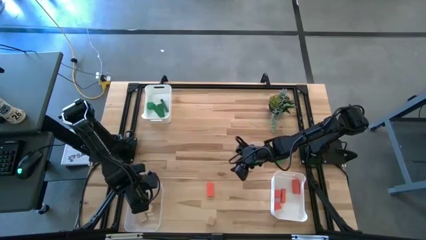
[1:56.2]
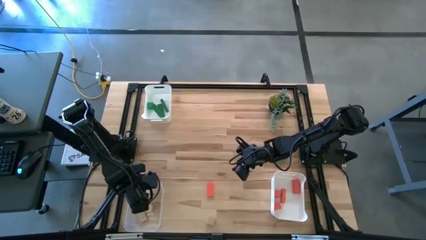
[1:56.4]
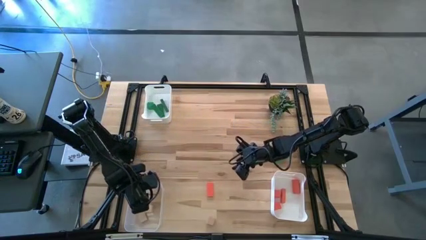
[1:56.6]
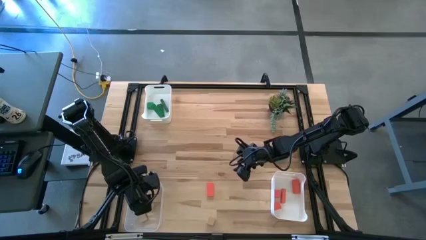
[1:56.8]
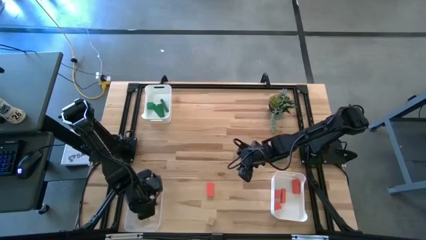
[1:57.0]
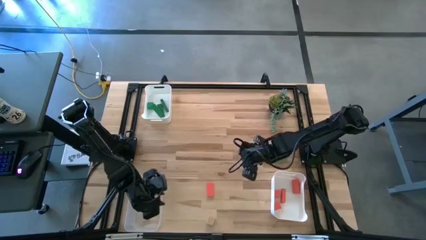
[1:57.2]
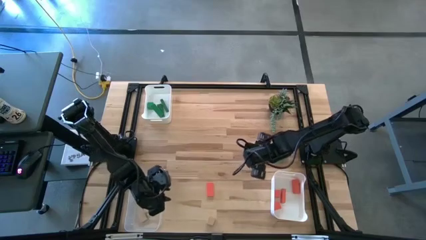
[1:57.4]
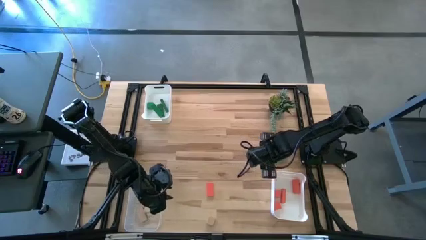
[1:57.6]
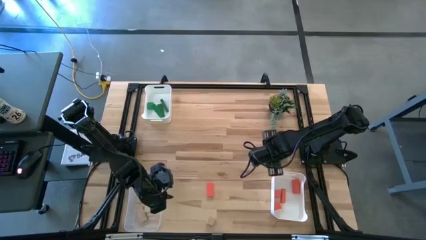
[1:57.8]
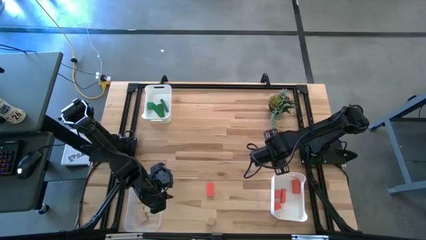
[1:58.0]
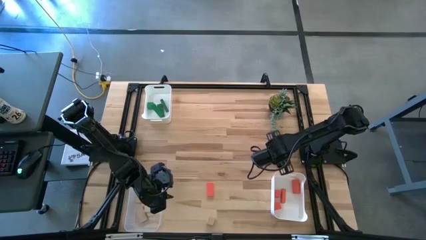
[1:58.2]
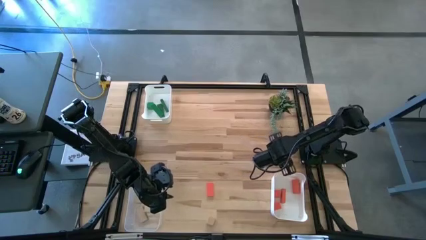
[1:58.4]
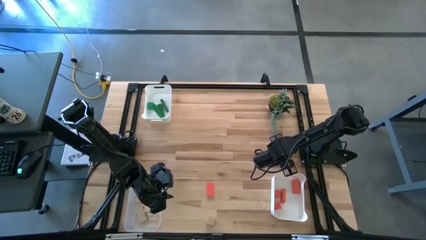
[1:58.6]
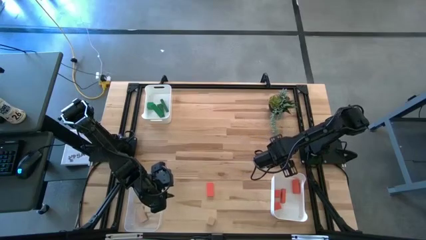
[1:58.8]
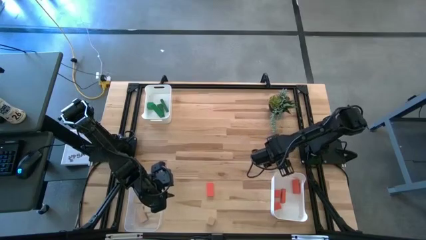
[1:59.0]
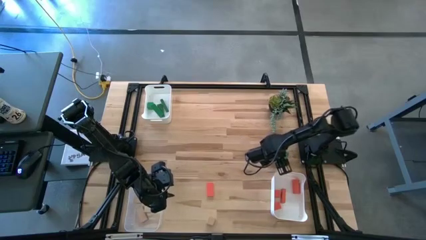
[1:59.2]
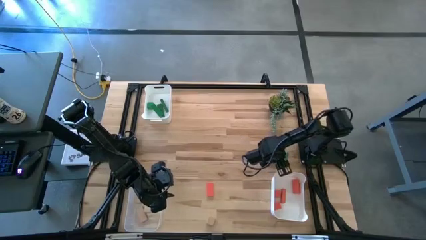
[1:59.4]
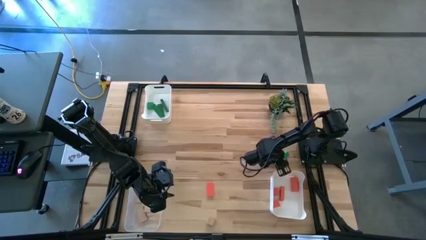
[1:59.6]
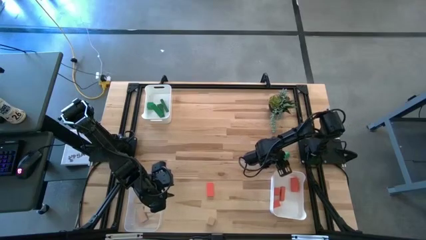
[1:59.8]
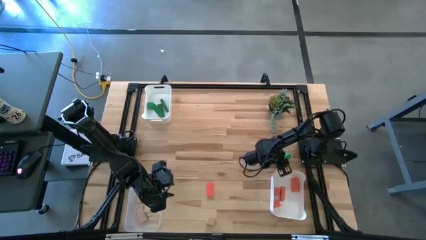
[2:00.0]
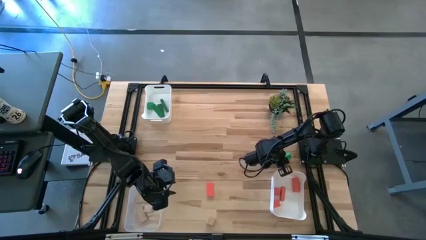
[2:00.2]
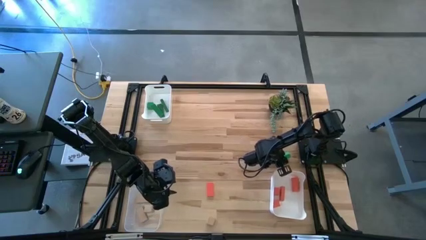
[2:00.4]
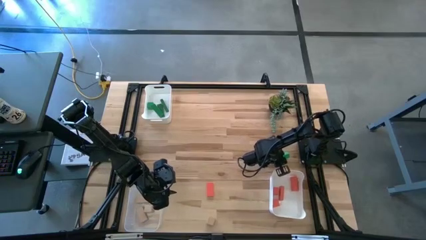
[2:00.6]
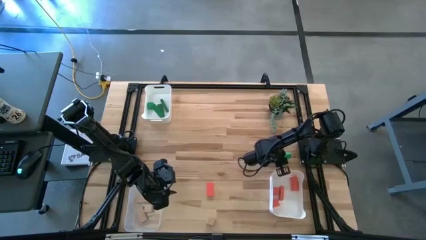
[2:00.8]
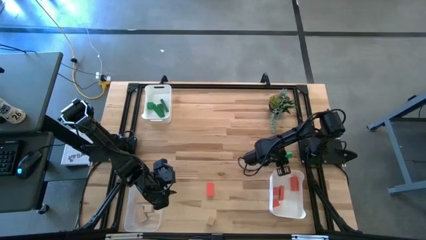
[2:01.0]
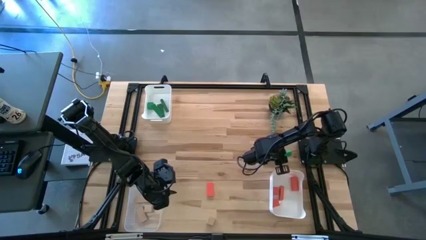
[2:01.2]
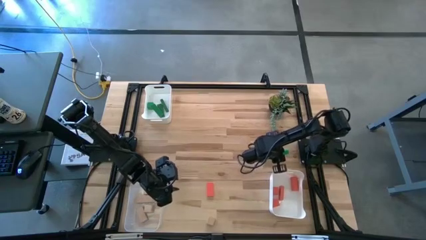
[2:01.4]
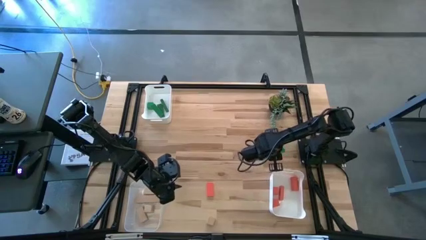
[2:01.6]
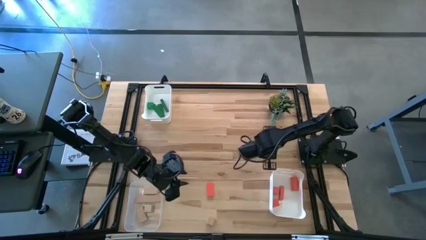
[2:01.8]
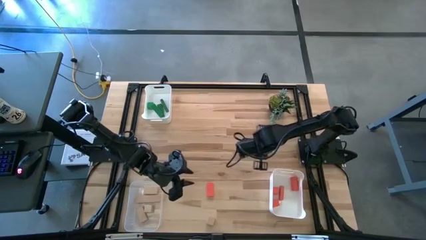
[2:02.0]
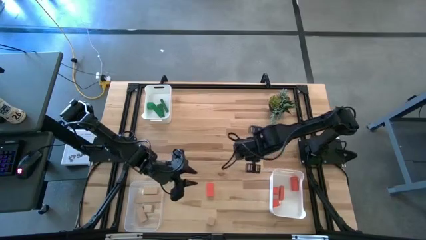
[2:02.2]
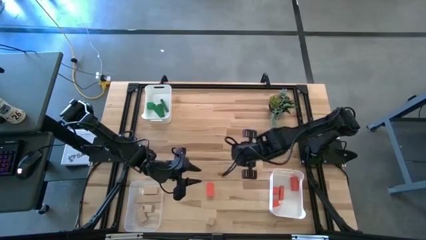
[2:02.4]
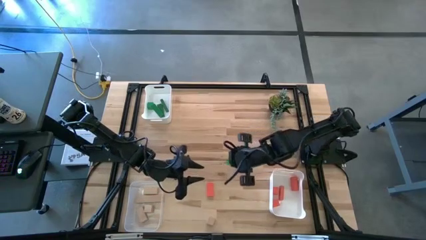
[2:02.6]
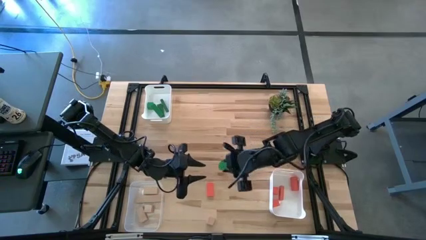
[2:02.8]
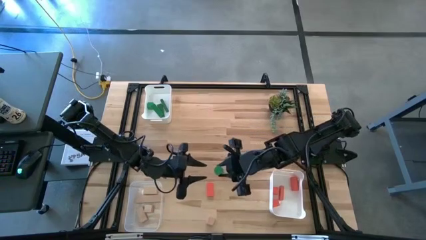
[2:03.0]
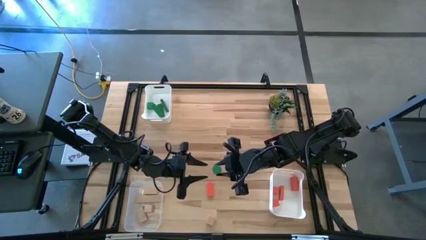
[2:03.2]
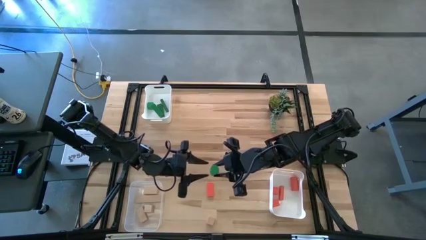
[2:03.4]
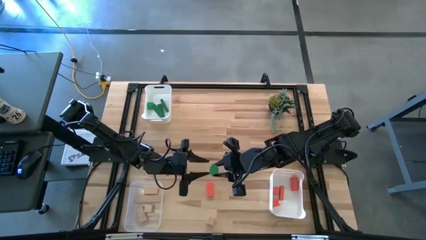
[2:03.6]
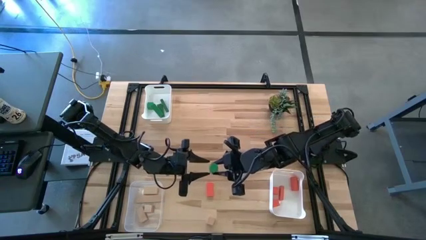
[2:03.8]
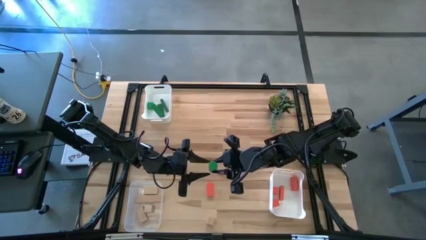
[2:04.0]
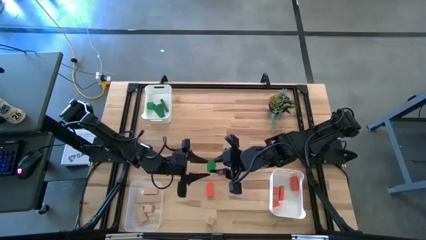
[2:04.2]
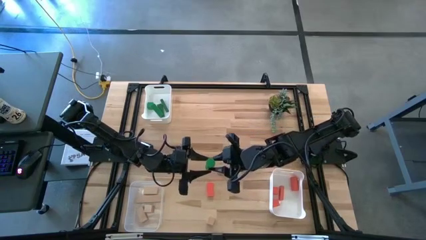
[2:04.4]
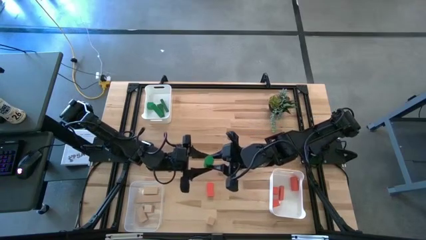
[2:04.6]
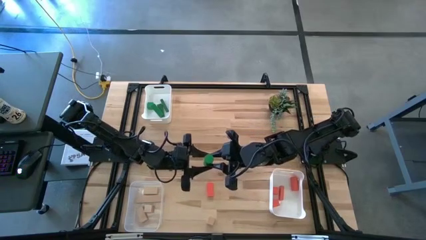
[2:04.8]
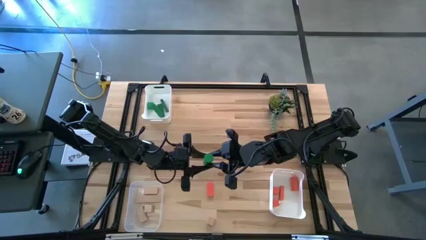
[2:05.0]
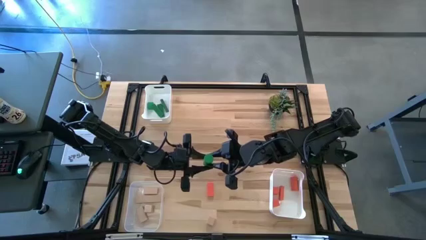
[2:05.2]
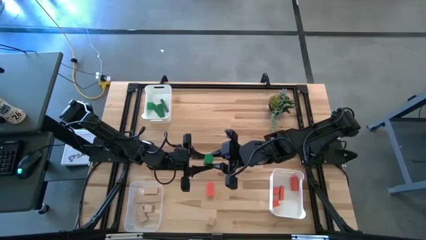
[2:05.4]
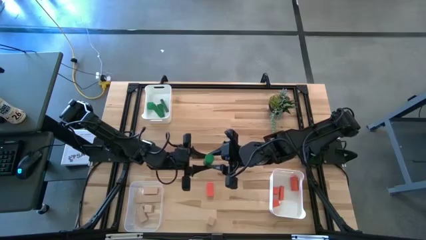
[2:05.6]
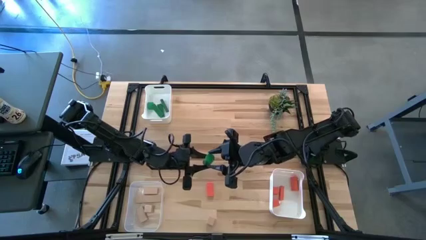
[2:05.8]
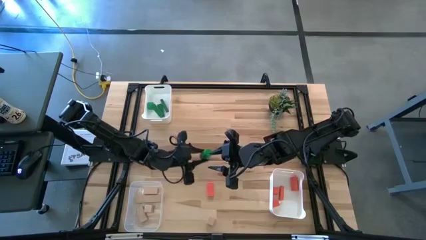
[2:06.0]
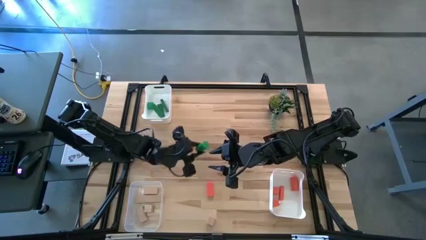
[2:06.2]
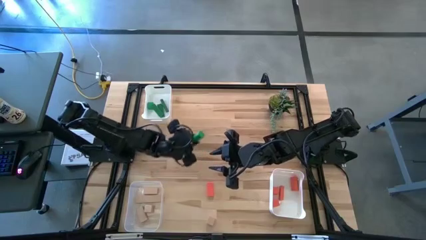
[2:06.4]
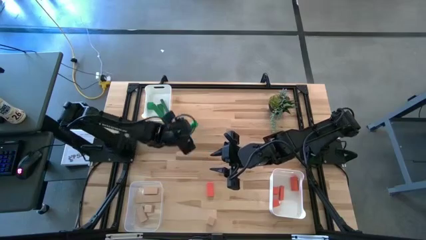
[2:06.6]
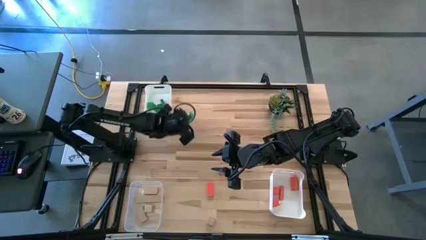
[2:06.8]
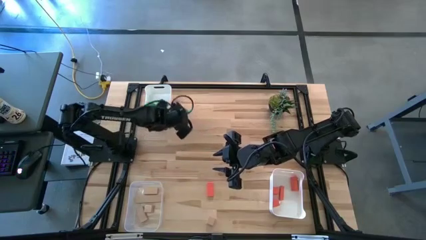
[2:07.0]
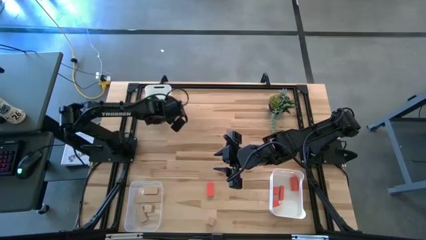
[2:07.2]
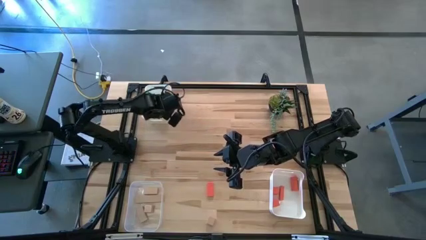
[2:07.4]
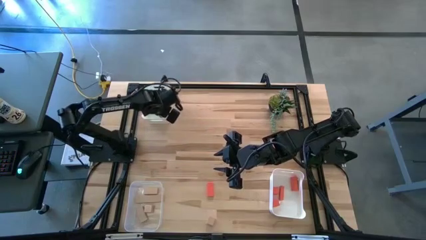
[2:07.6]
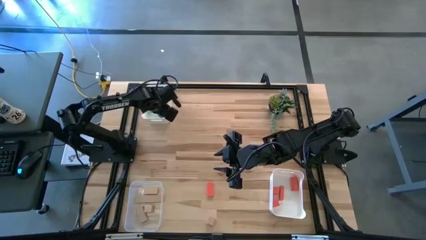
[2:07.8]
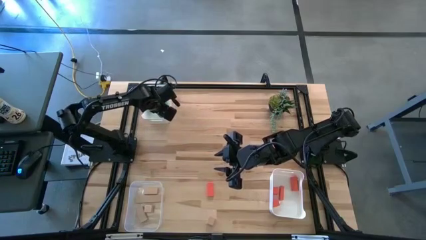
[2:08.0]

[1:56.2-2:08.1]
Task: Sort & place blocks by color
Put the green block into the top white bin

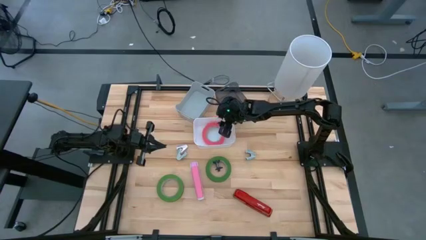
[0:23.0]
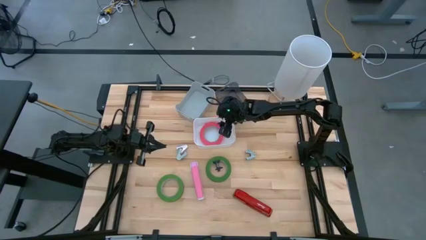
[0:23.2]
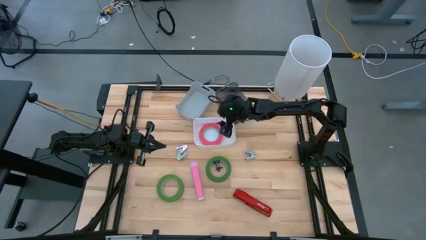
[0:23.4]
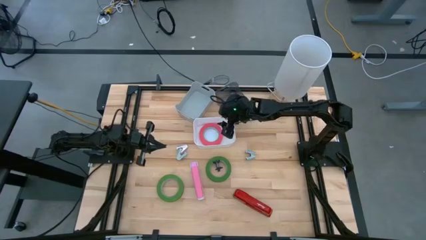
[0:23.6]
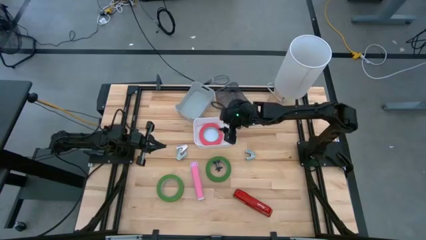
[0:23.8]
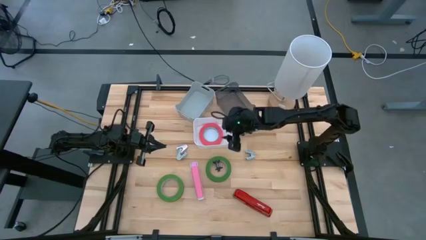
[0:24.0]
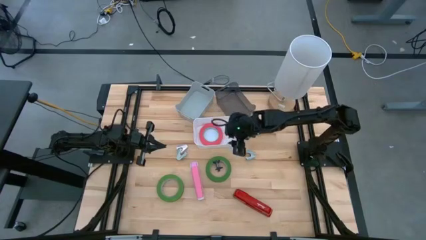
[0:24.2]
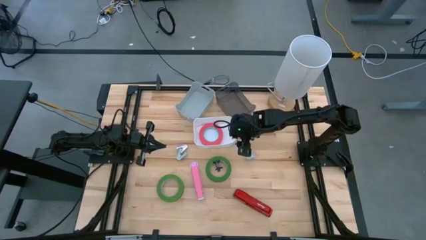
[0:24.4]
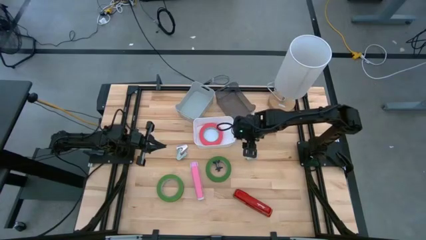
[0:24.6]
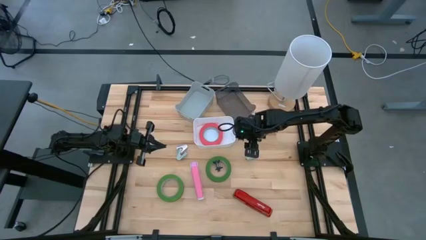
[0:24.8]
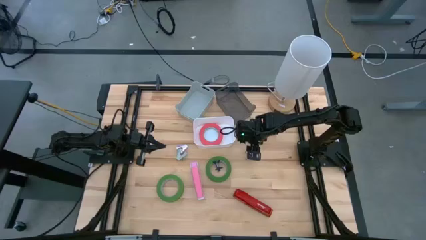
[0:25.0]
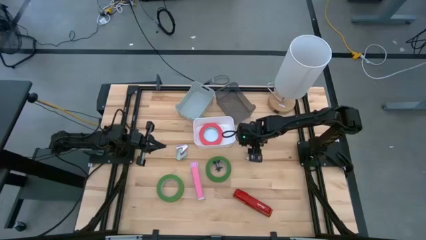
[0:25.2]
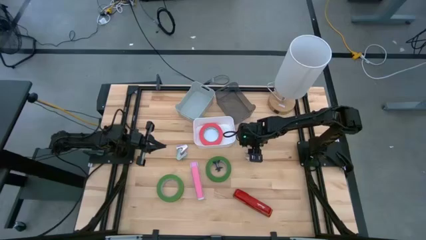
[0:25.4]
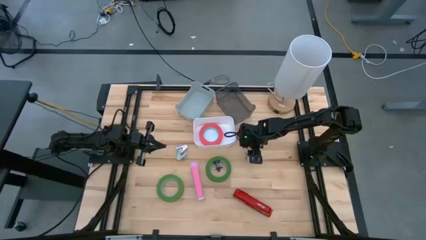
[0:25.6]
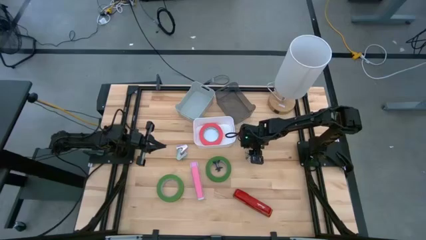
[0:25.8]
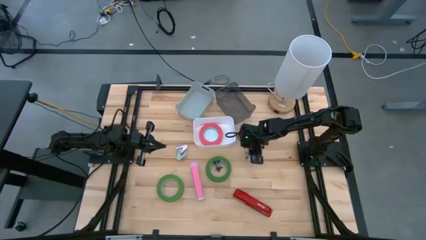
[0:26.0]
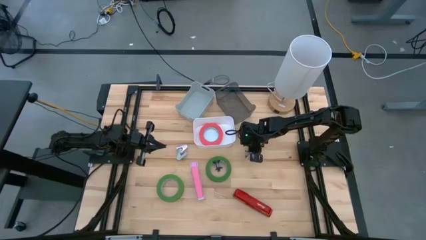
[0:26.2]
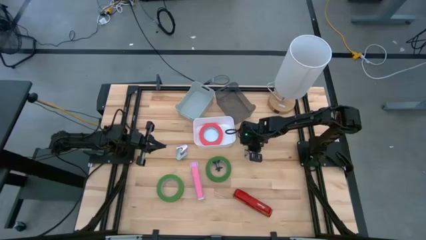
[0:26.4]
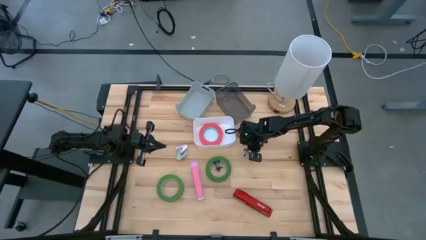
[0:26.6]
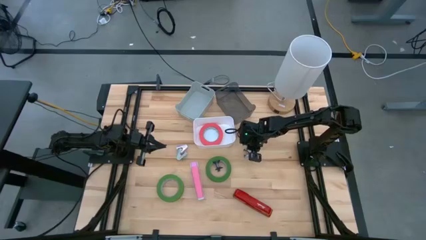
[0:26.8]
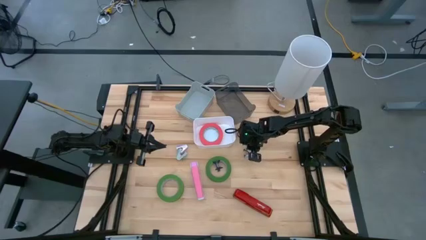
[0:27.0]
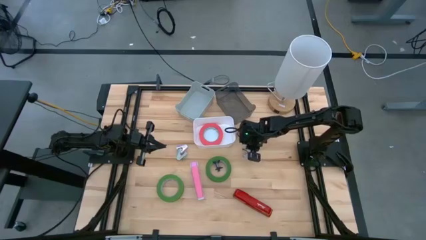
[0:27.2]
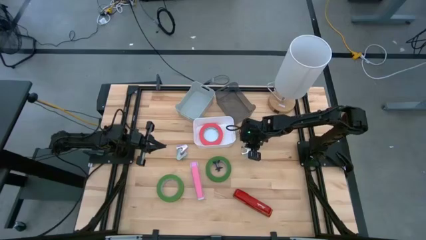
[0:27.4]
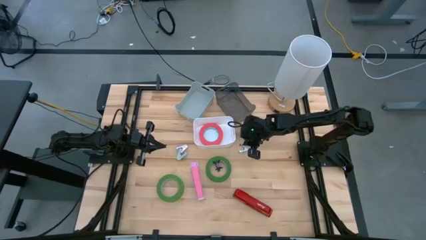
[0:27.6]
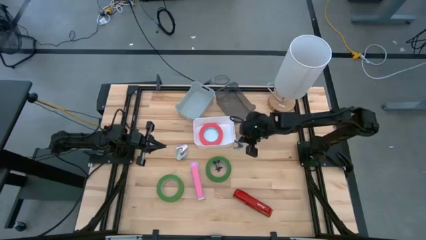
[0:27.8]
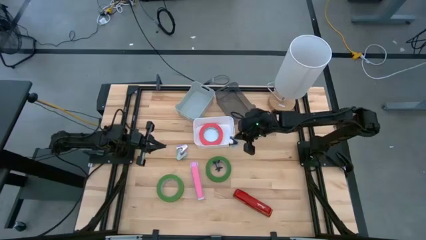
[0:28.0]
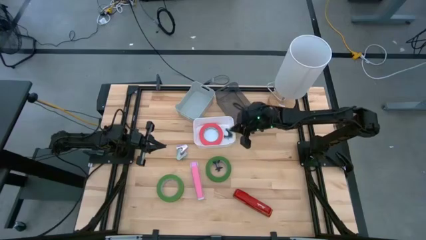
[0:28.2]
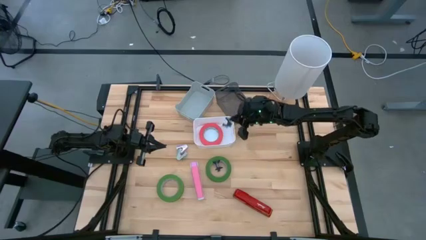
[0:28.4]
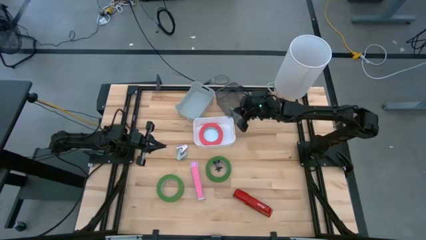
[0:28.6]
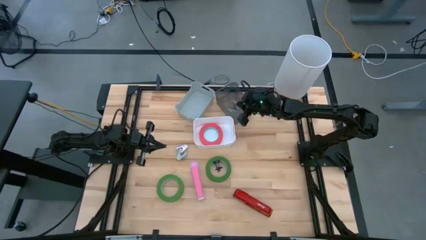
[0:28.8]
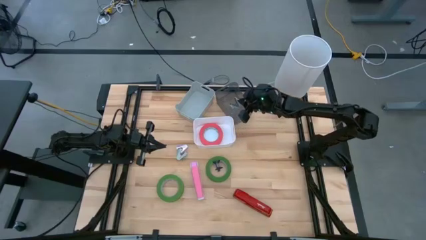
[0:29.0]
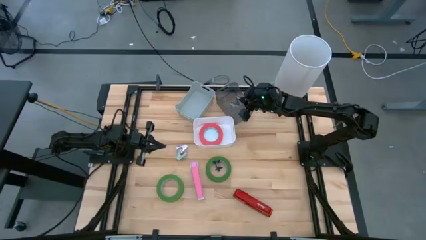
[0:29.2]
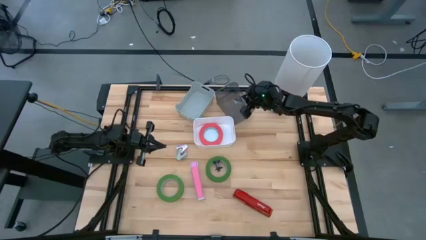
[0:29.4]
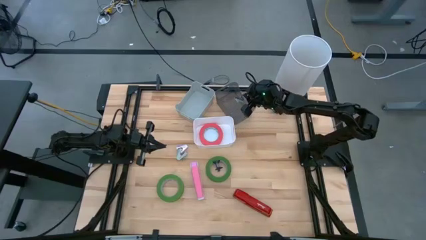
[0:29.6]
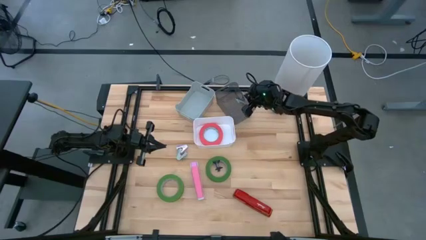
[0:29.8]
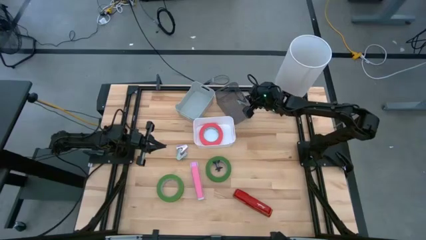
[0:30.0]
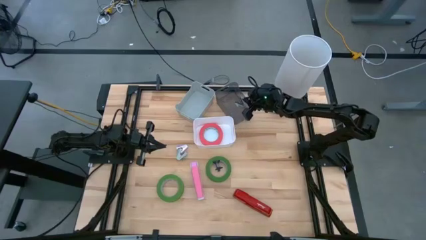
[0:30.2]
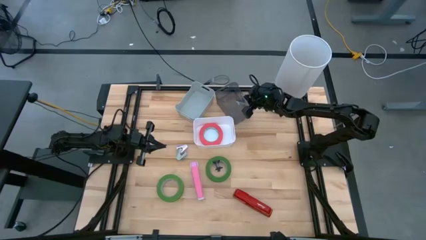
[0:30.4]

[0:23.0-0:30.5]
Task: Pick and place Stapler, Stapler remover, tape
Put the right blue staple remover into the black bin
